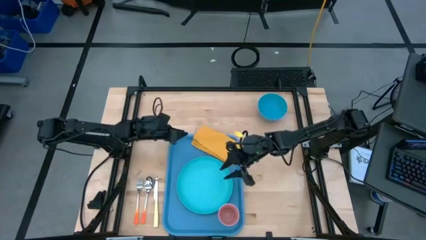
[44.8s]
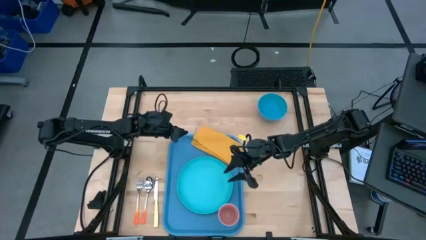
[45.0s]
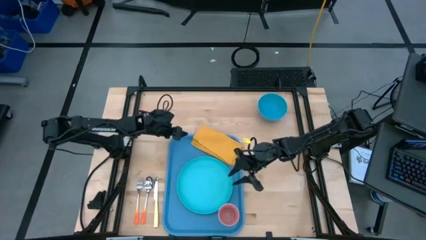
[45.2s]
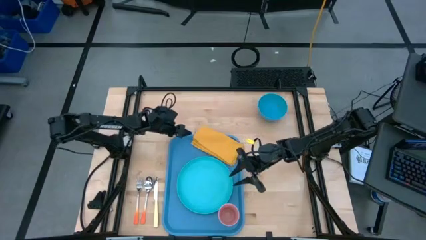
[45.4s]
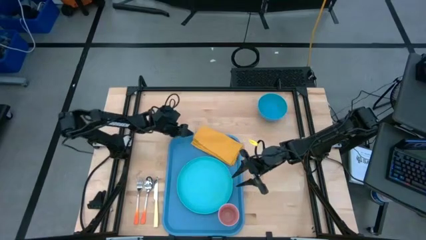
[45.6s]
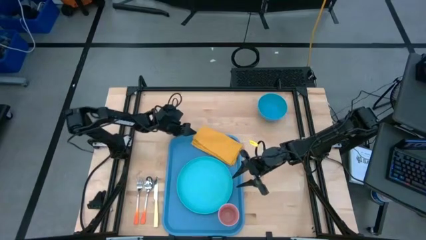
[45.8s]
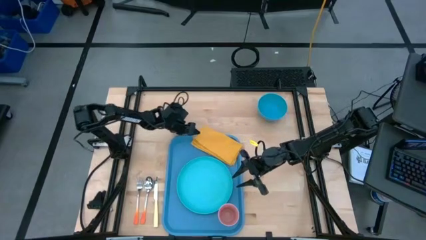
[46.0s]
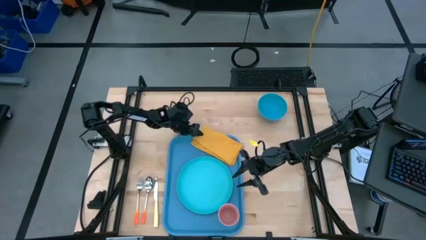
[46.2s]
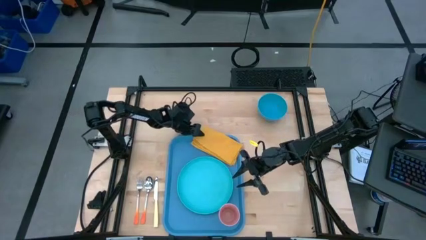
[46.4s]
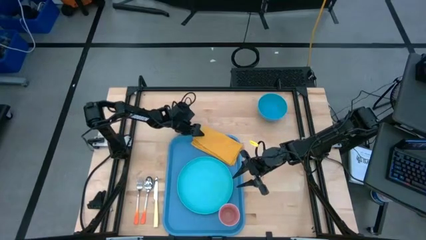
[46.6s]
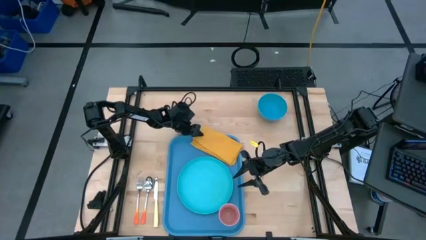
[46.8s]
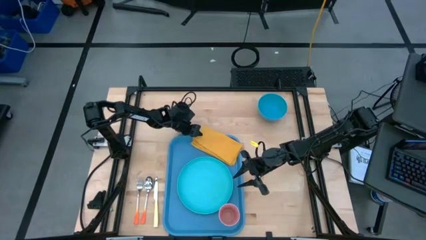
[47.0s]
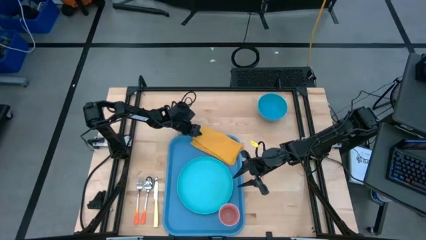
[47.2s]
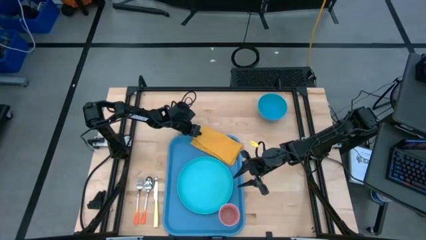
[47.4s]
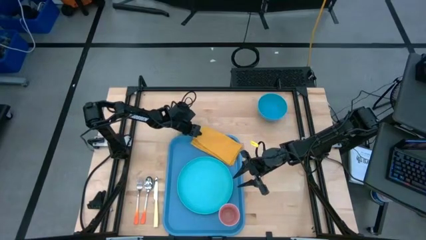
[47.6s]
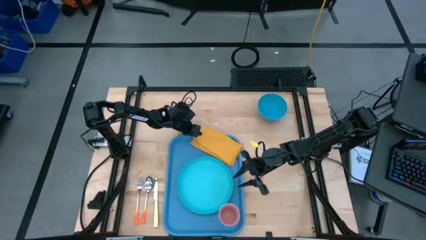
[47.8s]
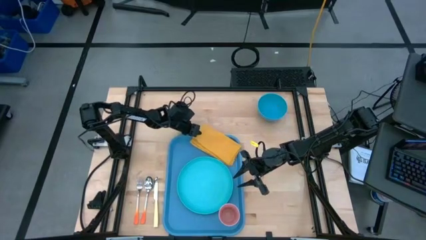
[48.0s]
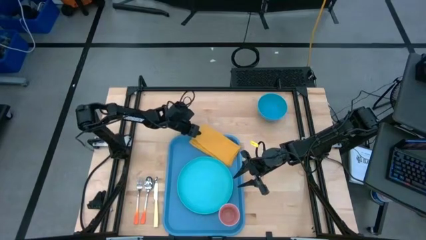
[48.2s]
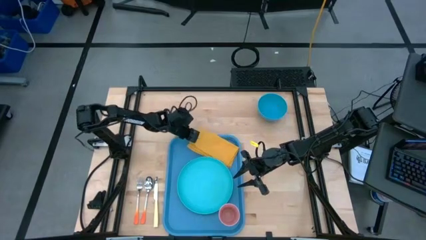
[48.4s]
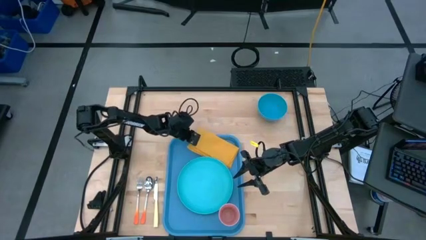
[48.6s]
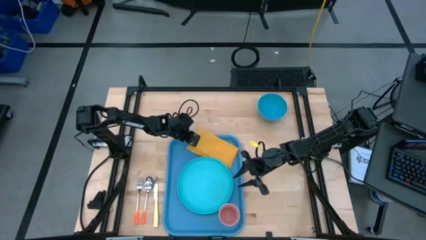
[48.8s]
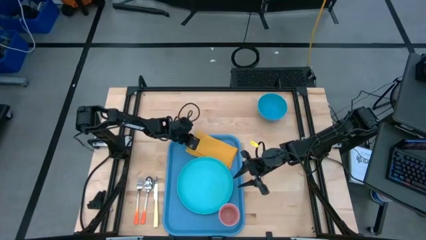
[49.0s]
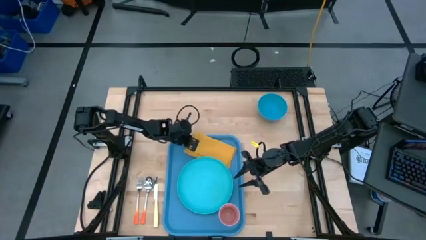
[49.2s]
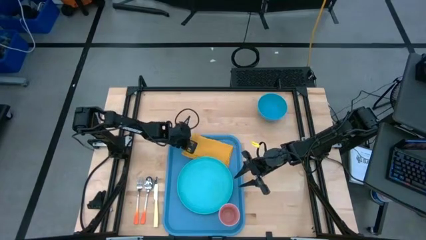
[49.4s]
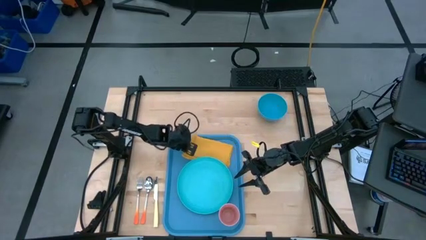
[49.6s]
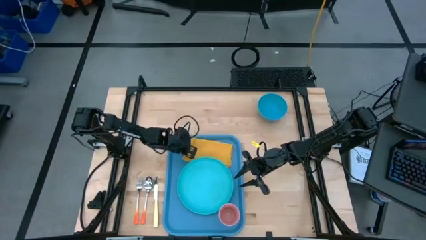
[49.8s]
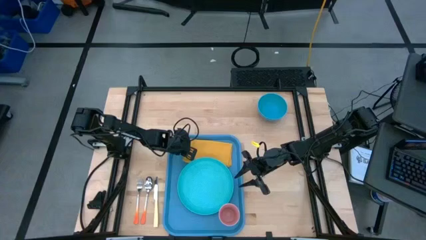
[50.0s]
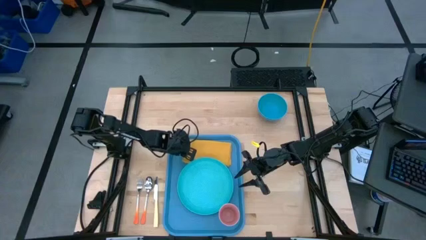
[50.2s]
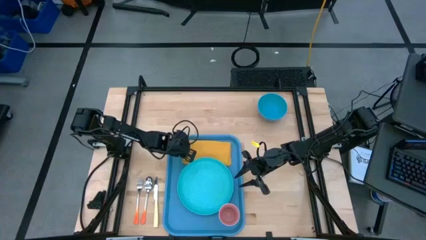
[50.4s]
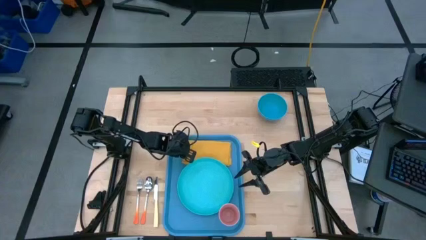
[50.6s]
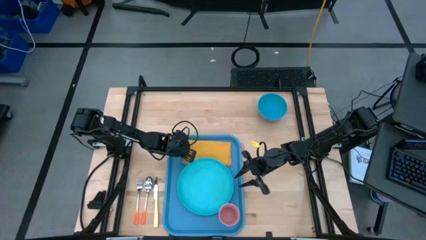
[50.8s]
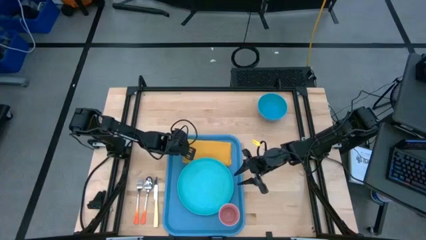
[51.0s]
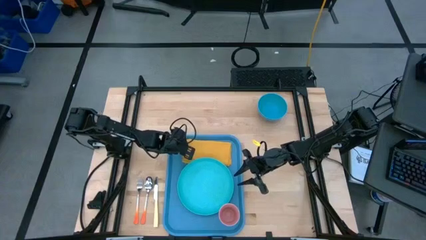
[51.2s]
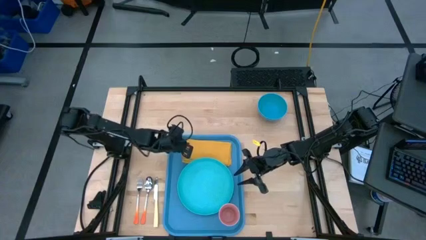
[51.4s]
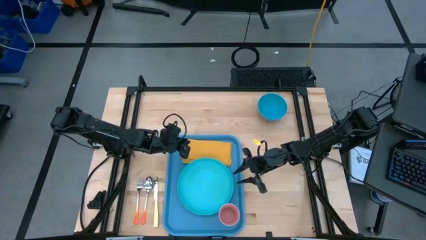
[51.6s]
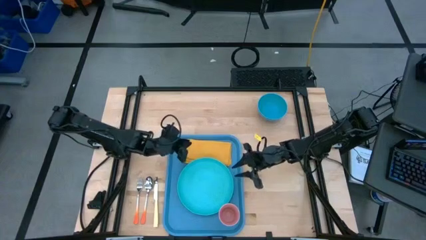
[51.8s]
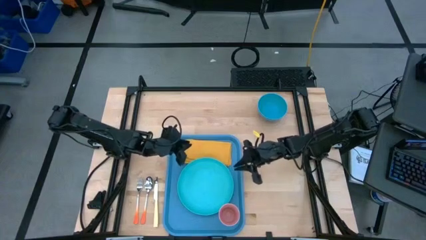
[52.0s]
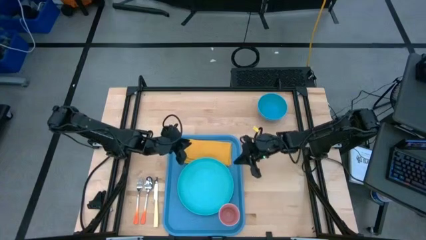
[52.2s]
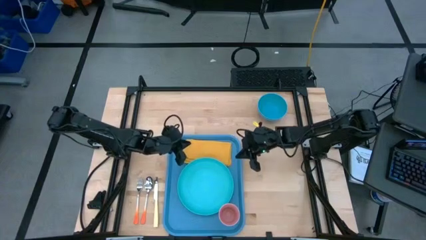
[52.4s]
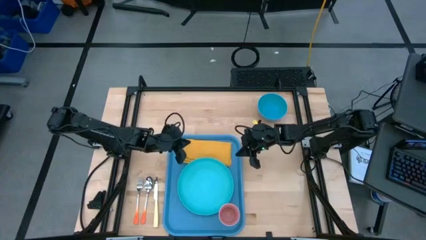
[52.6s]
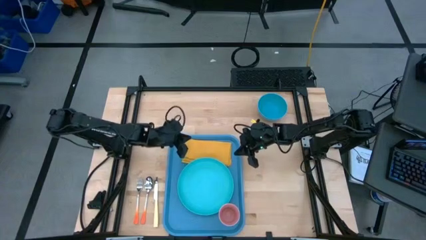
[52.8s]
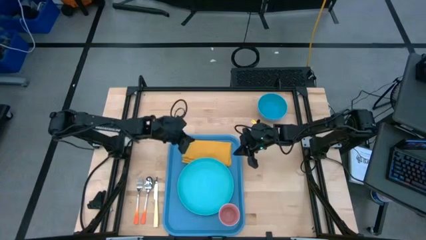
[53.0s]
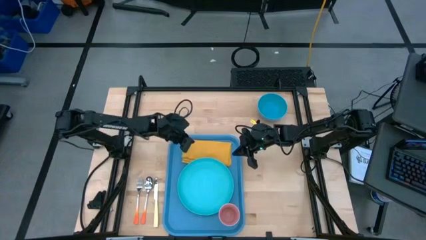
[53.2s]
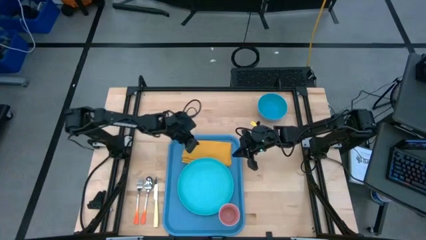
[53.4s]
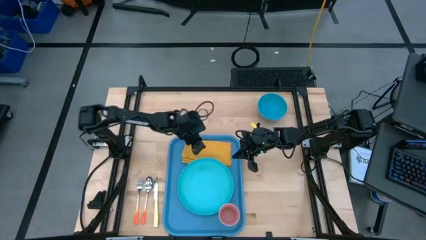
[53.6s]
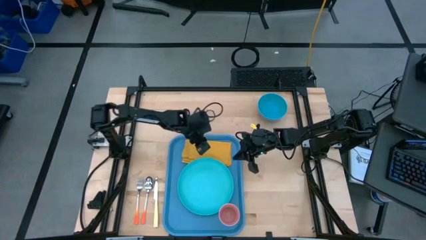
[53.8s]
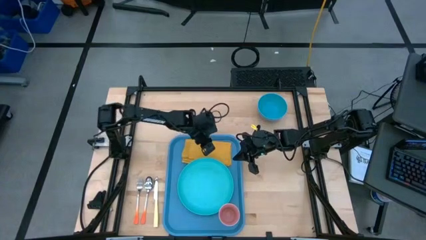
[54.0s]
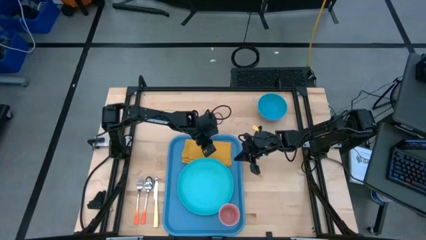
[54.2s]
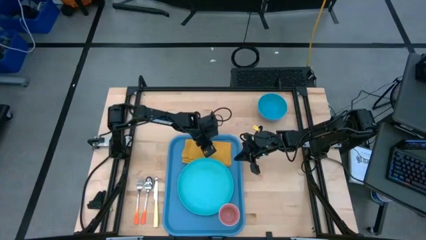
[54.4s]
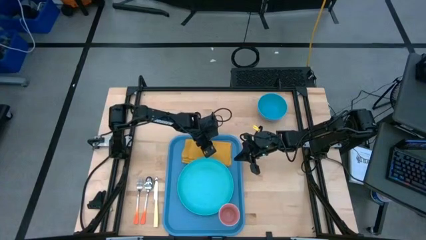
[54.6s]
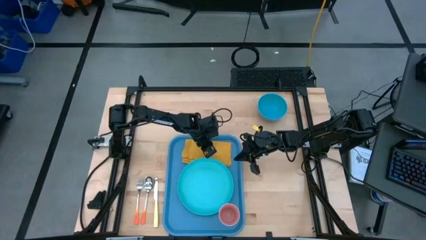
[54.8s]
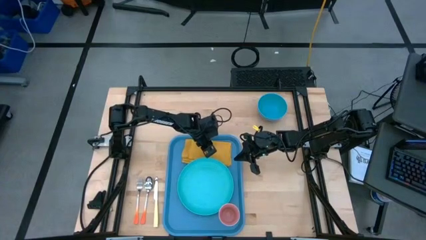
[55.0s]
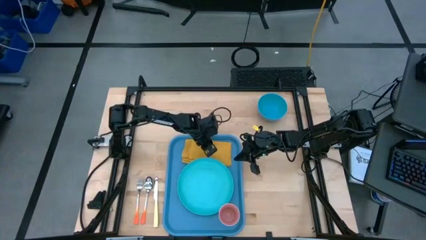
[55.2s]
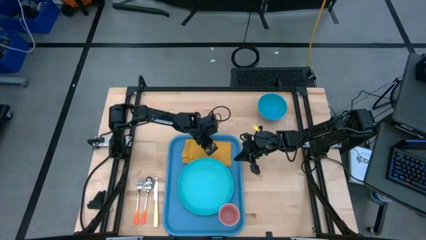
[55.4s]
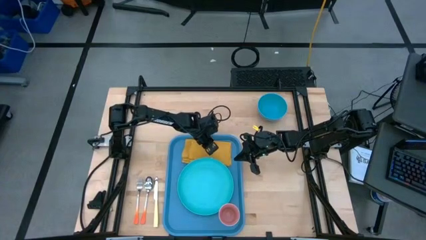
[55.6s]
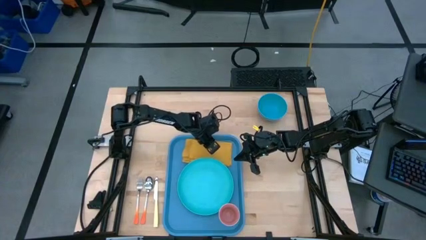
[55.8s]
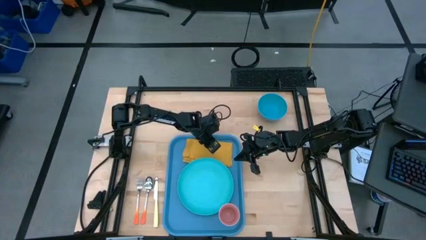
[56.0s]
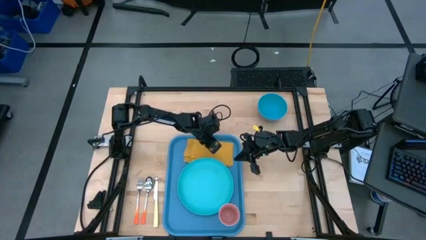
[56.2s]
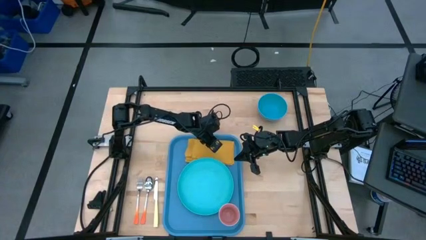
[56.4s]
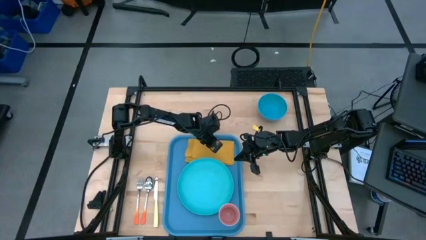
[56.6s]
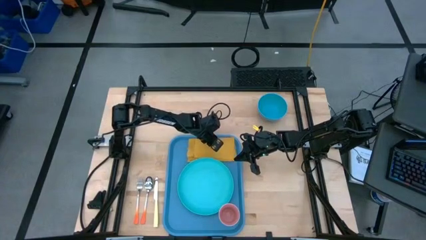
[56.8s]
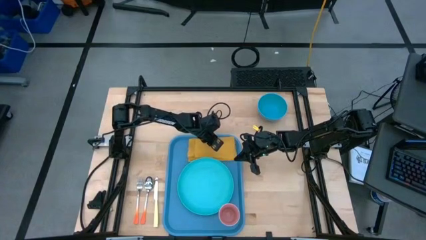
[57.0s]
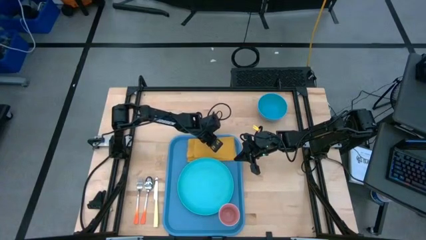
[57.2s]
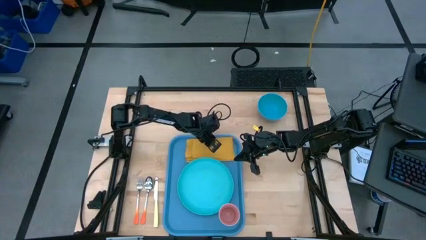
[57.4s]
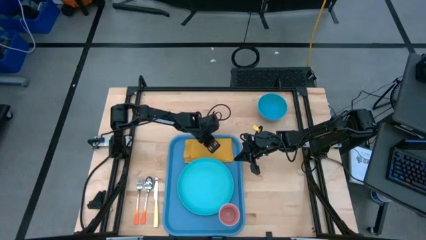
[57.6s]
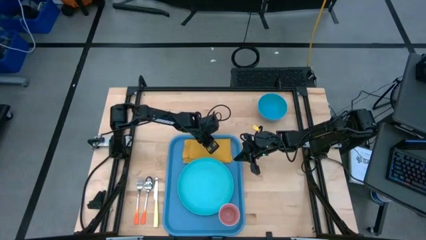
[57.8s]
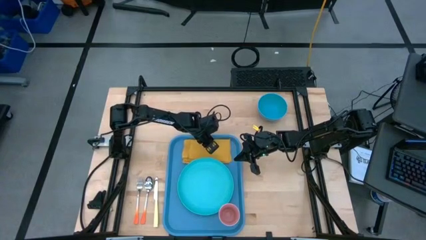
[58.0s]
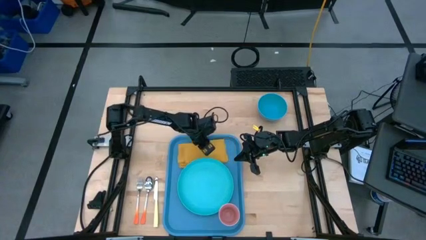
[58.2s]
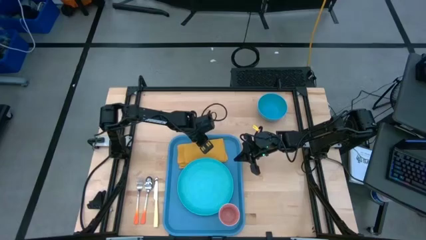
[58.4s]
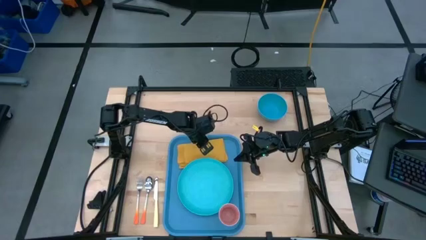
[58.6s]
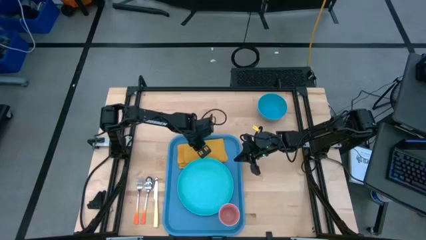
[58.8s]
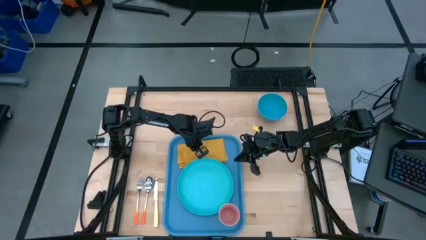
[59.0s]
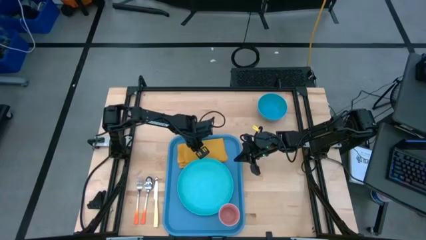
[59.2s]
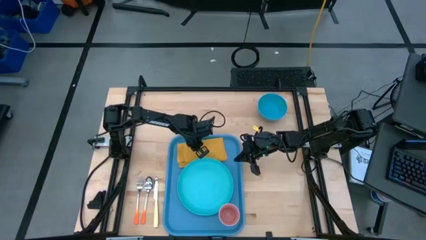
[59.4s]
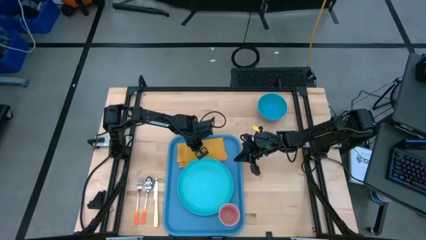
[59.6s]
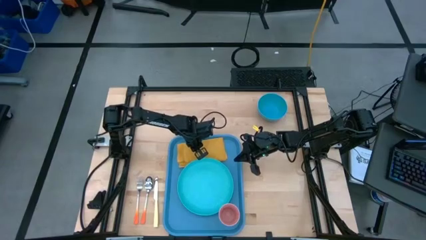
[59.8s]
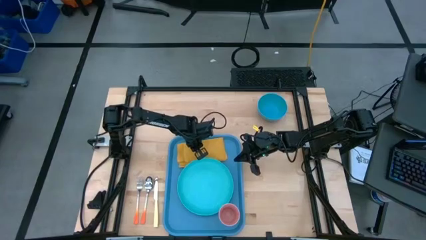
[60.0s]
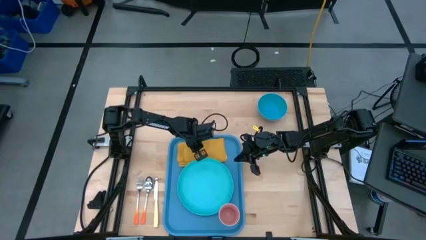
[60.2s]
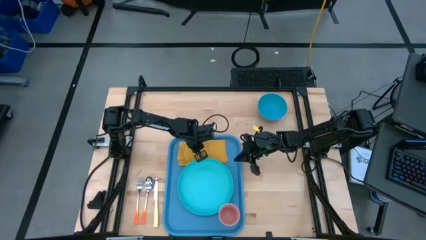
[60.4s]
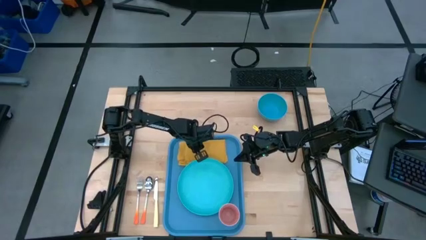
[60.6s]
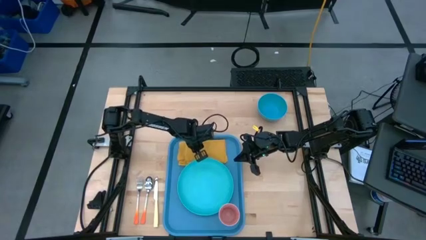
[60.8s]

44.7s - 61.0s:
Task: Set up tray
Put the yellow napkin to the left of the blue plate on the blue serving tray
